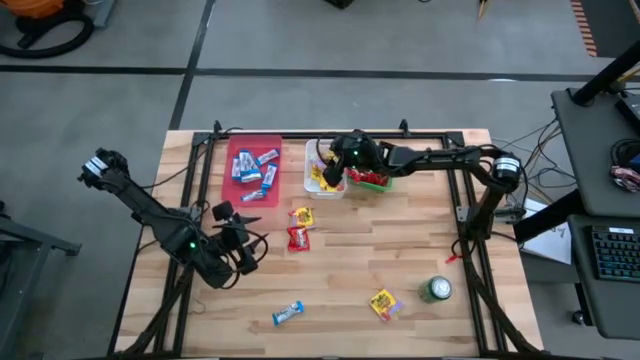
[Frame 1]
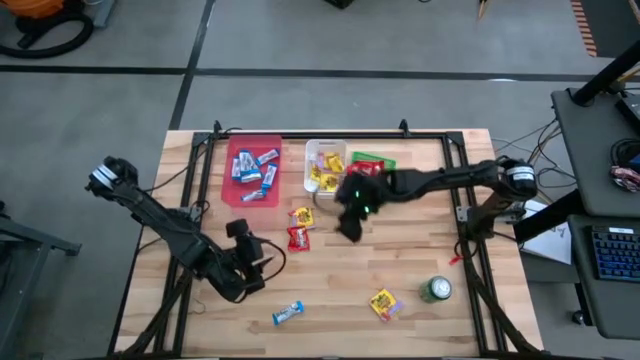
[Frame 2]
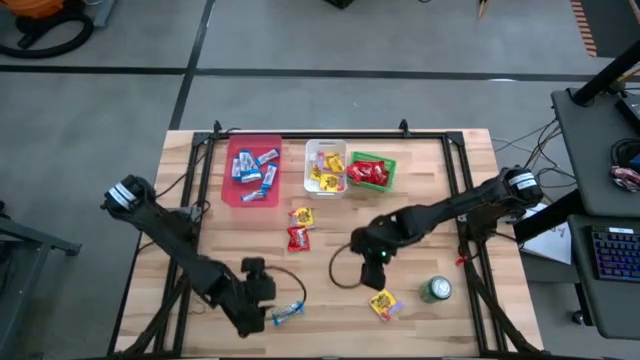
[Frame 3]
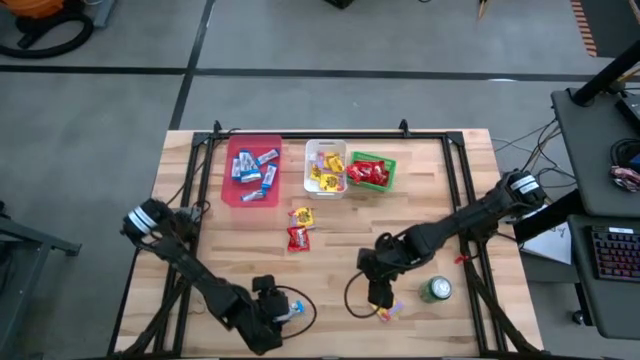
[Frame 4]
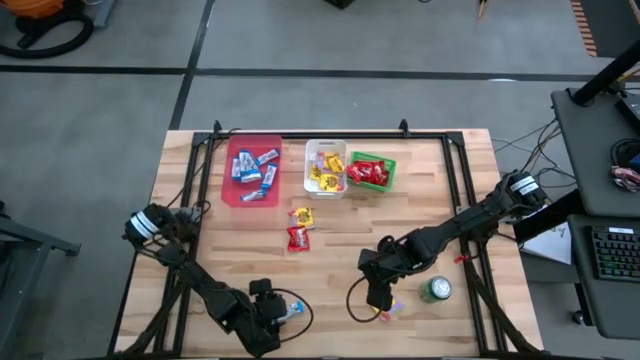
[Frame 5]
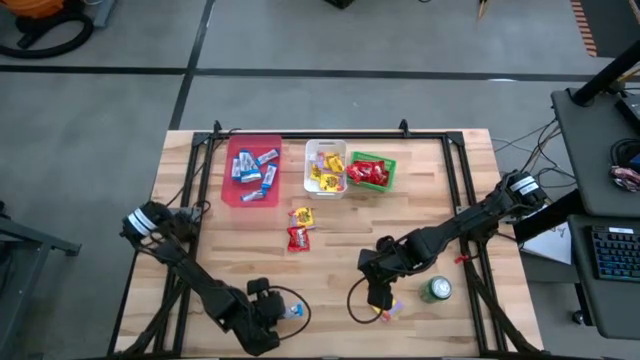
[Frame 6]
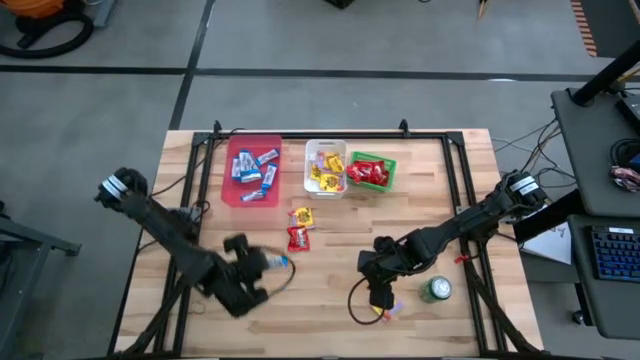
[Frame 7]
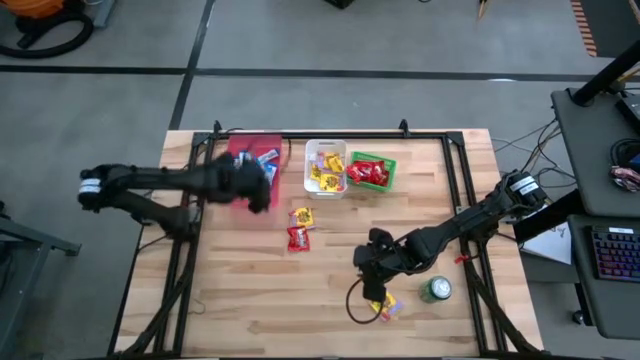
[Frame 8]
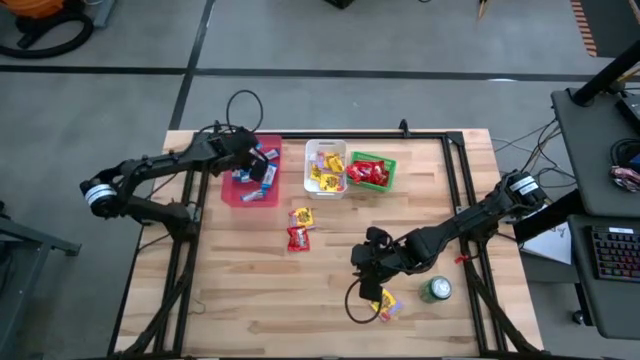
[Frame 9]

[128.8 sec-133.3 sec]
Task: Sort candy
Put the white chocolate into the pink bin

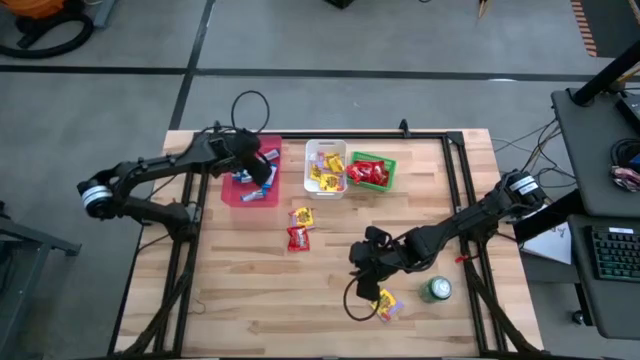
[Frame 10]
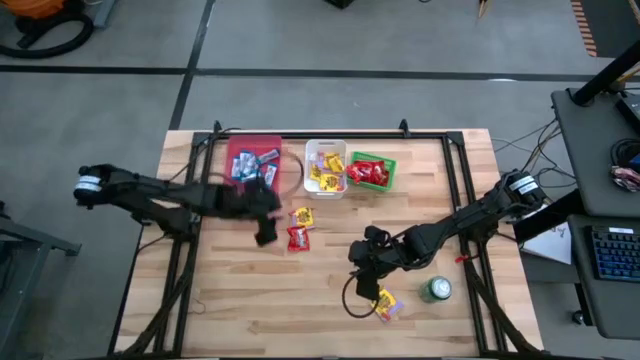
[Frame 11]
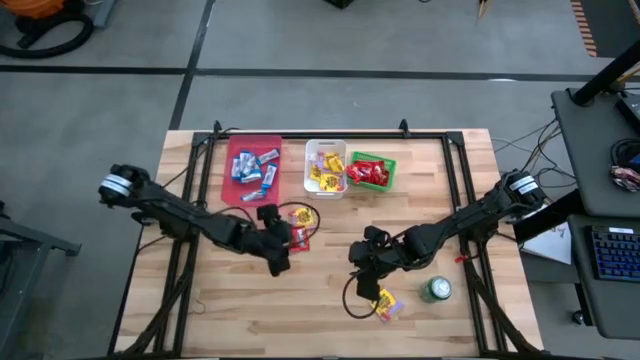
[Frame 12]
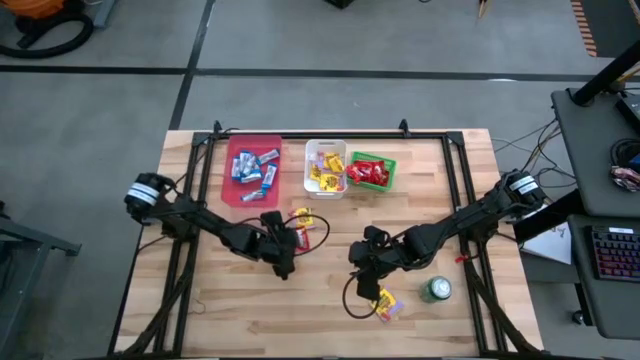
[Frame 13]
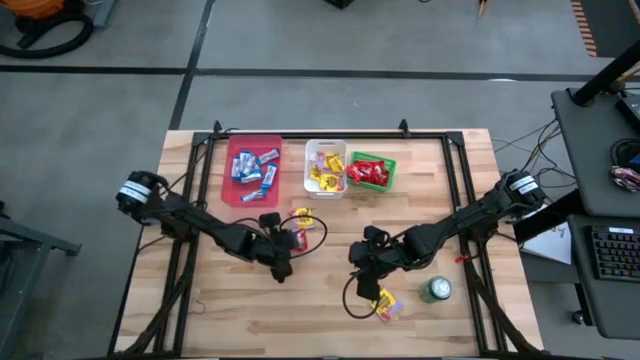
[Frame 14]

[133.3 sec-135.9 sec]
Put the red candy into the green bin

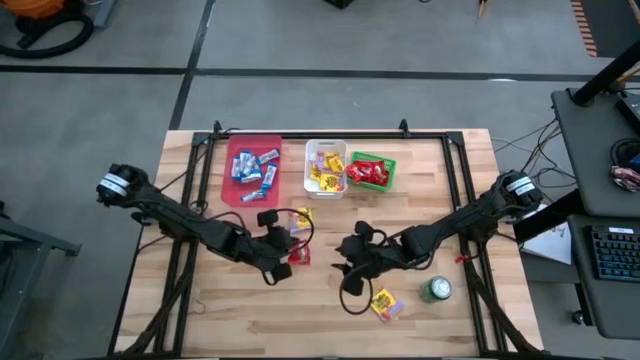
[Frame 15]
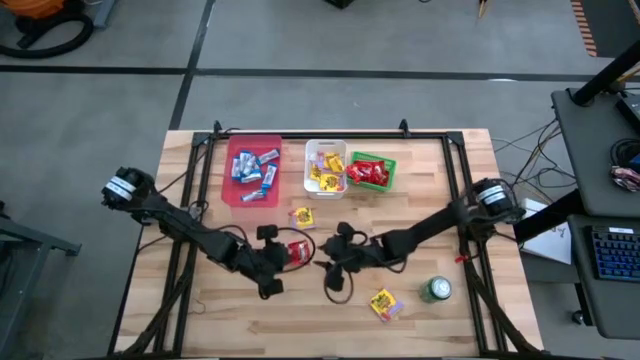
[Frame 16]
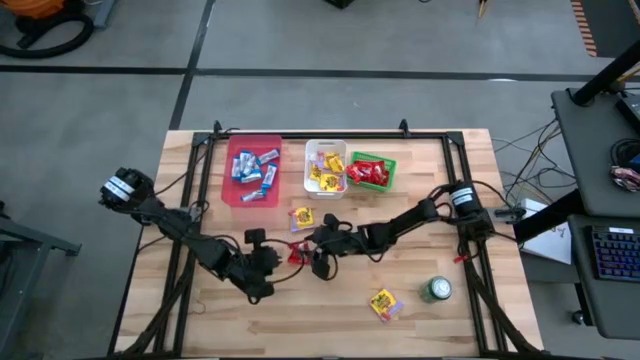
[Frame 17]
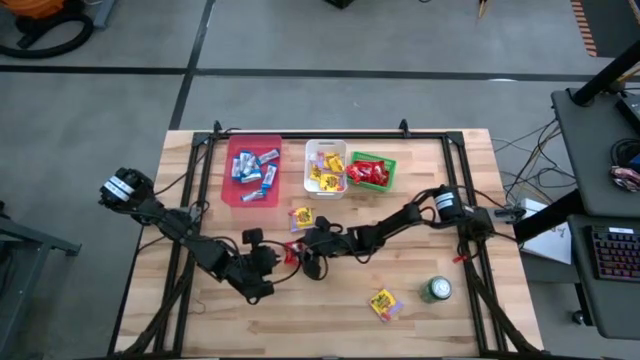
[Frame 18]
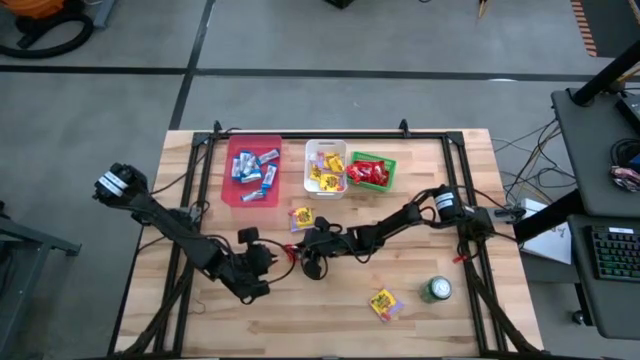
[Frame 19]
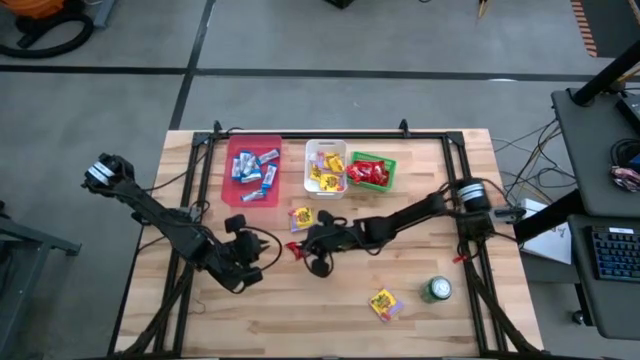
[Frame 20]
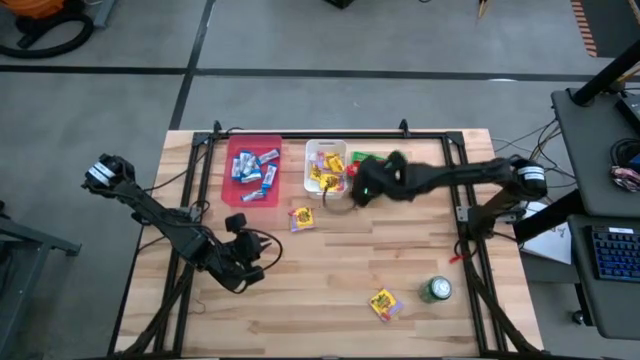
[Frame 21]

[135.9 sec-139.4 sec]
Put the red candy into the green bin

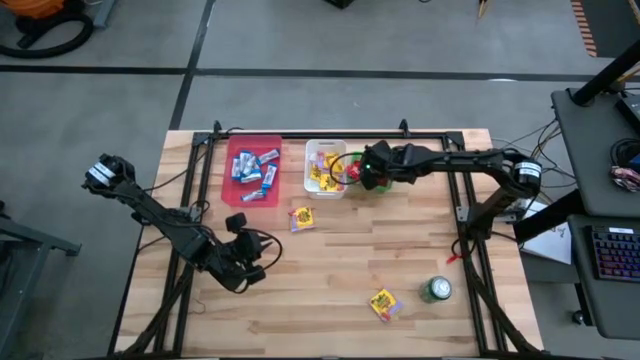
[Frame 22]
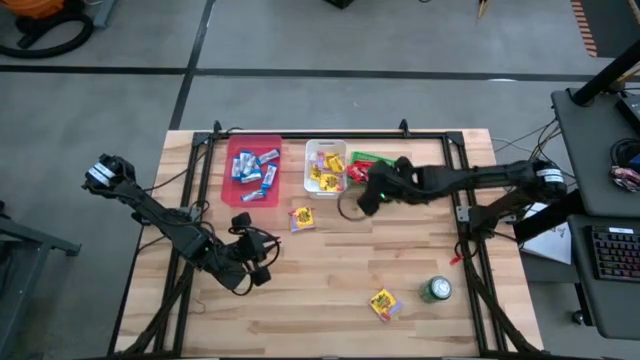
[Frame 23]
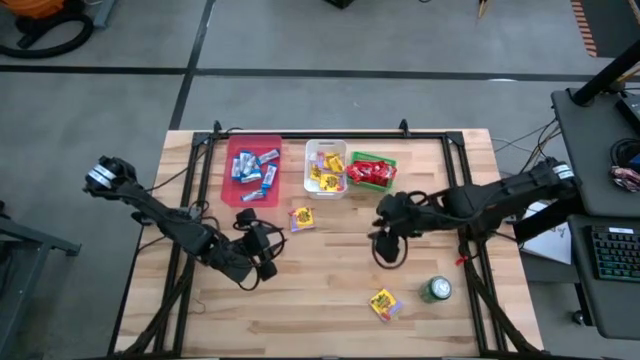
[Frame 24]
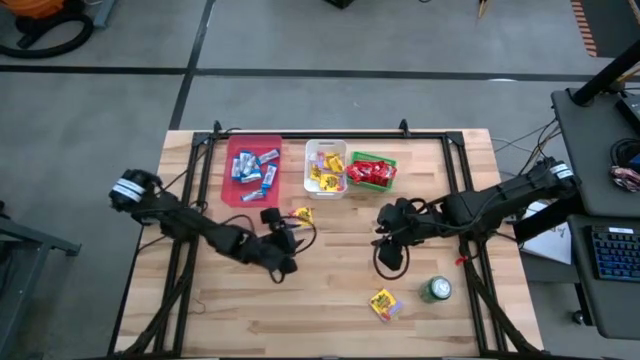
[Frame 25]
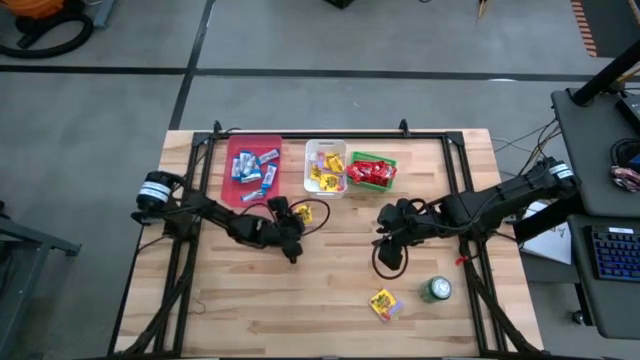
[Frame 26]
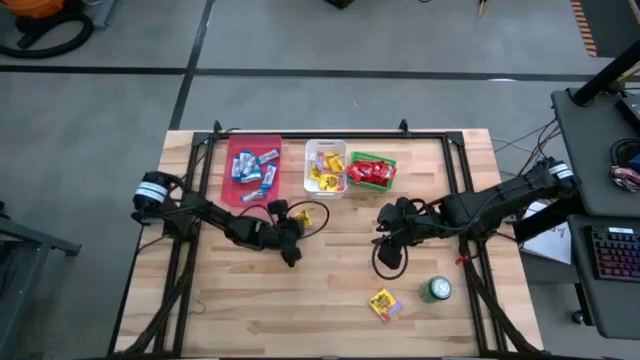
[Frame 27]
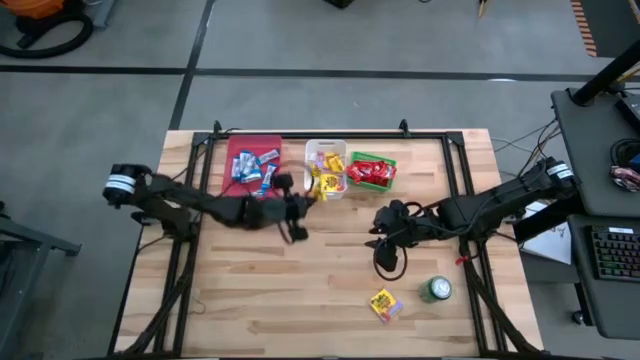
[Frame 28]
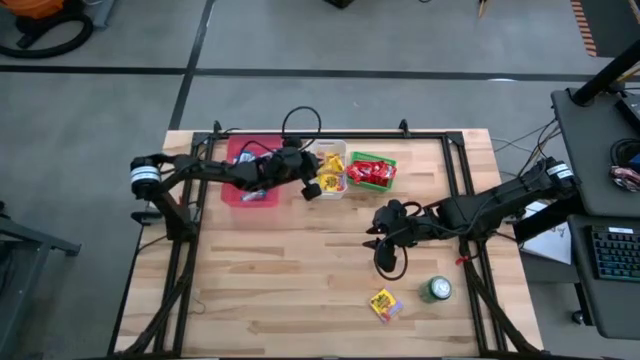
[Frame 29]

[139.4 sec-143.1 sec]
Put the yellow candy into the white bin

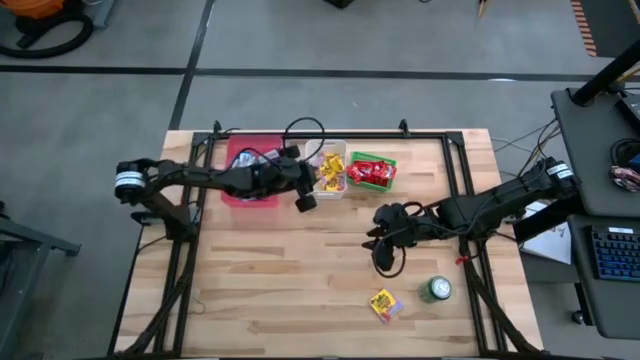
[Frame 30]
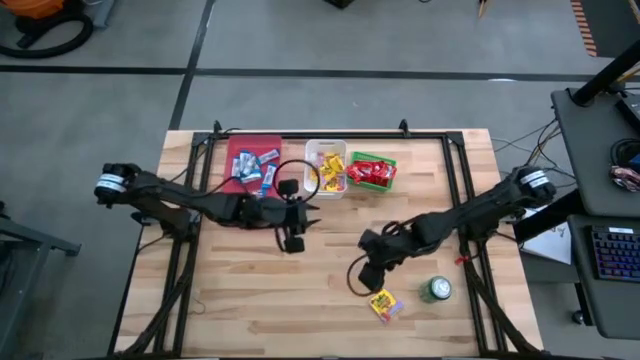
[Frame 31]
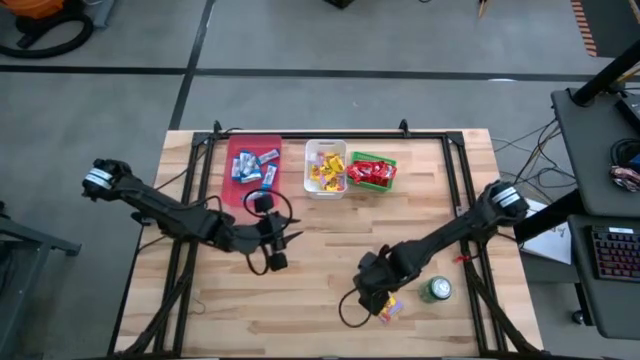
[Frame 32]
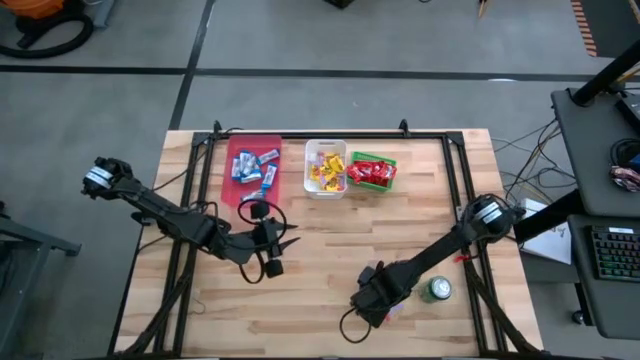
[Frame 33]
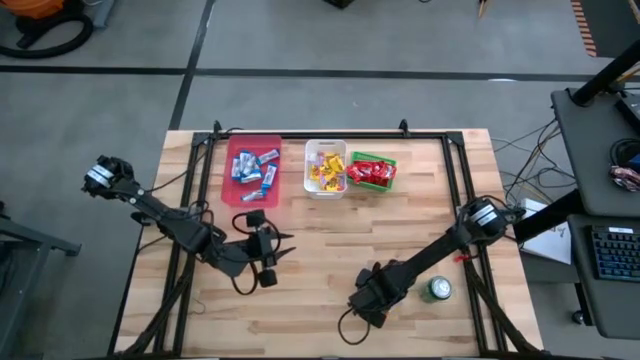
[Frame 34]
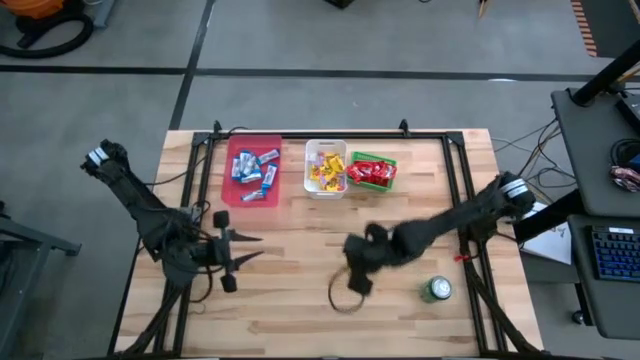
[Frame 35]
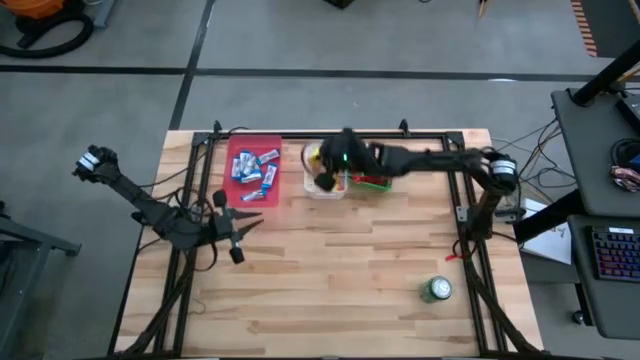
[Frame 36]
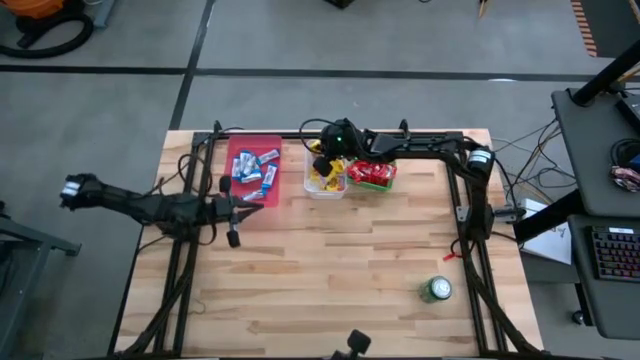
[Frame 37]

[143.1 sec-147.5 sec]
Put the yellow candy into the white bin

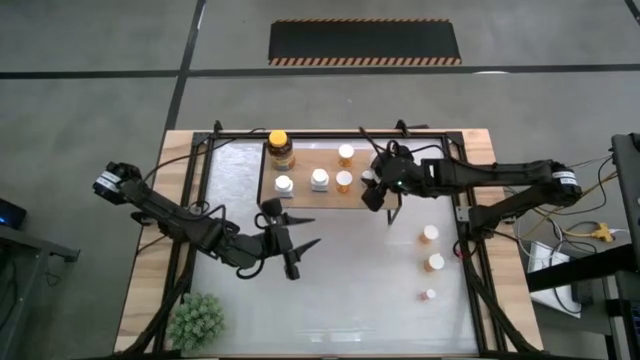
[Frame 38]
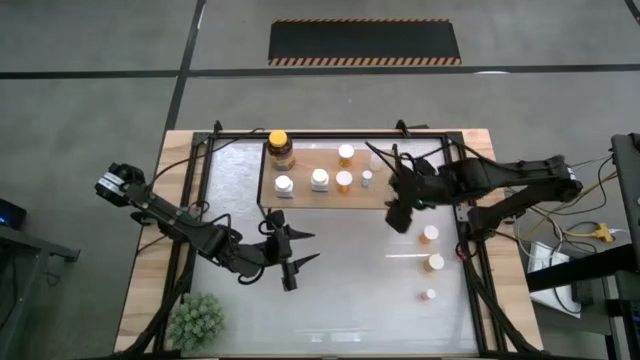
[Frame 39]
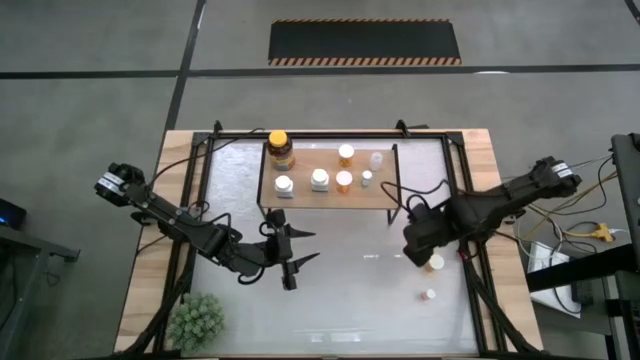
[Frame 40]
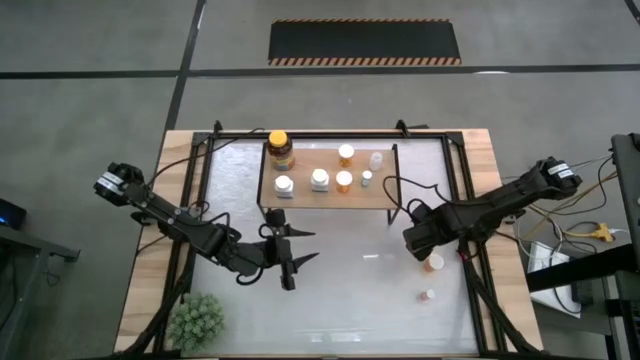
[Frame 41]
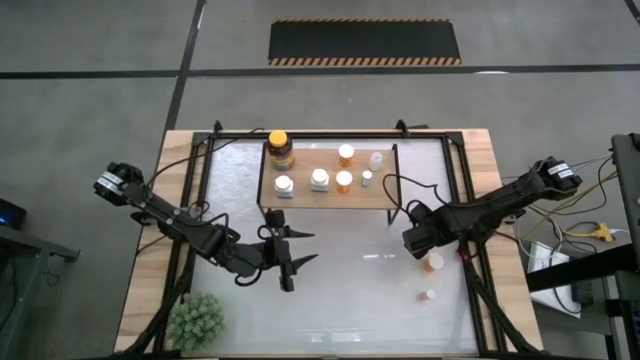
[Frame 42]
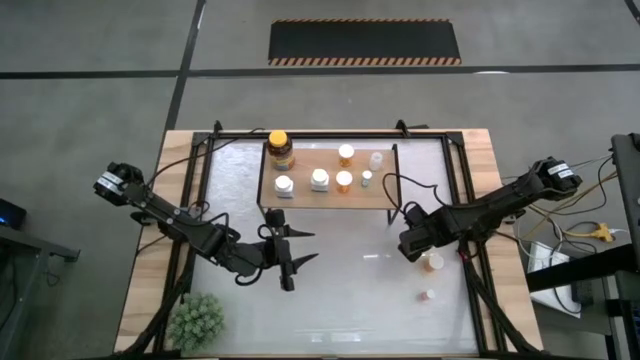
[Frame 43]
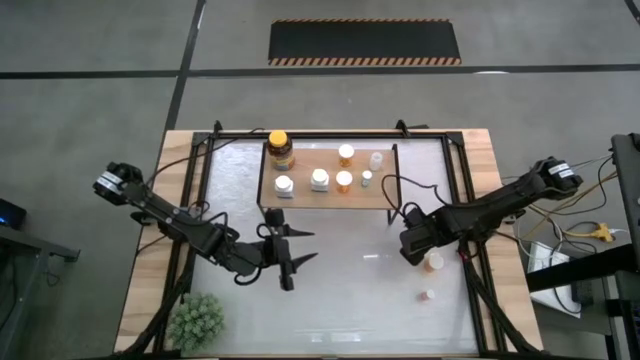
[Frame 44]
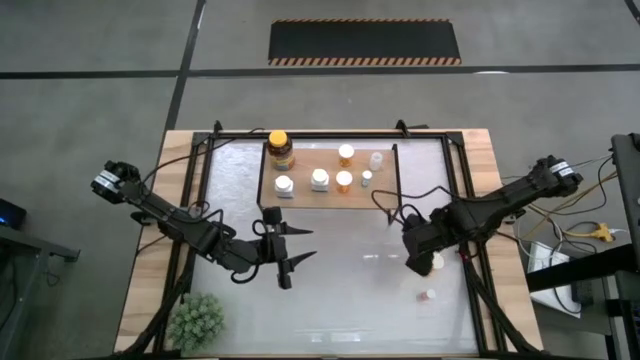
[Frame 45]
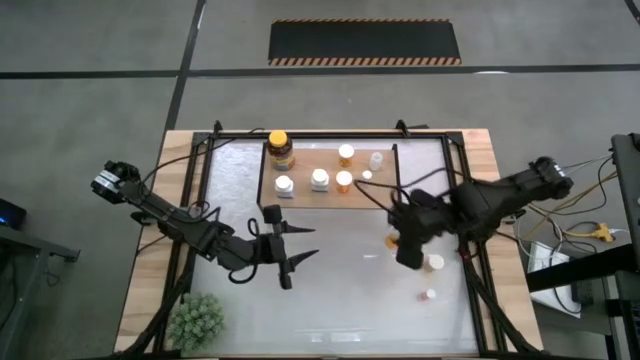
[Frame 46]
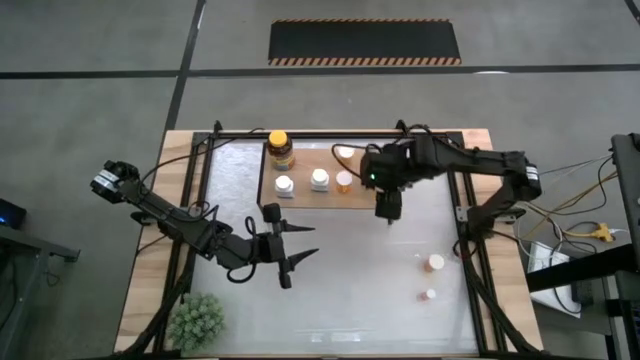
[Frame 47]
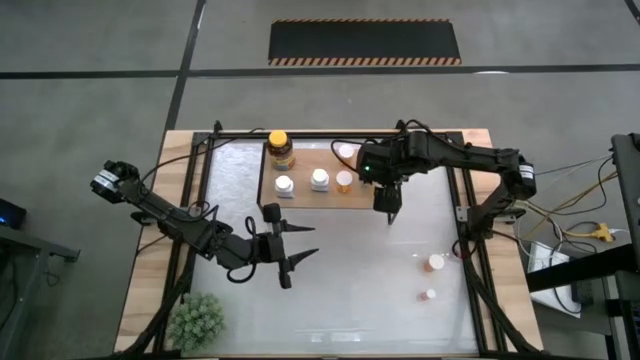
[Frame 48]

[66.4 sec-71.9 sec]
Task: Pick and place medicine bottles onto shelf by color
Put the orange pill bottle on the shelf
